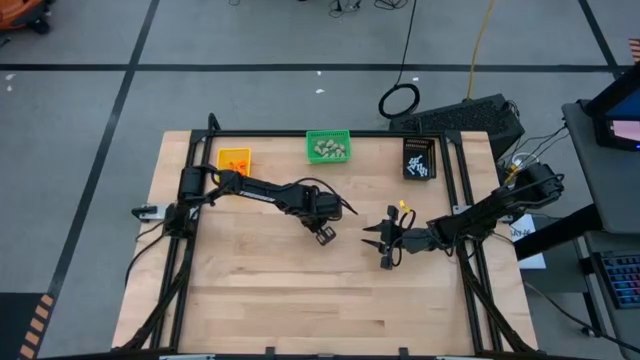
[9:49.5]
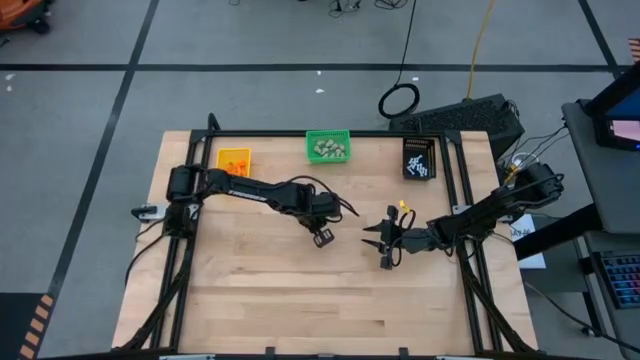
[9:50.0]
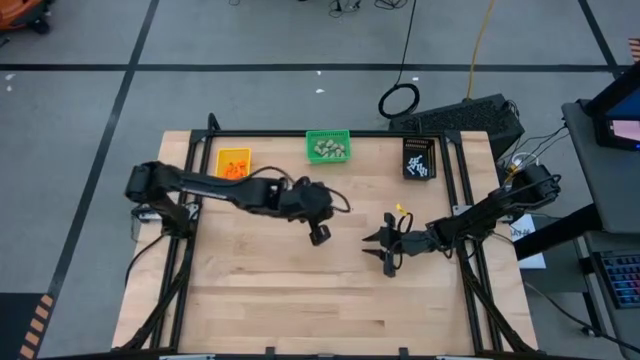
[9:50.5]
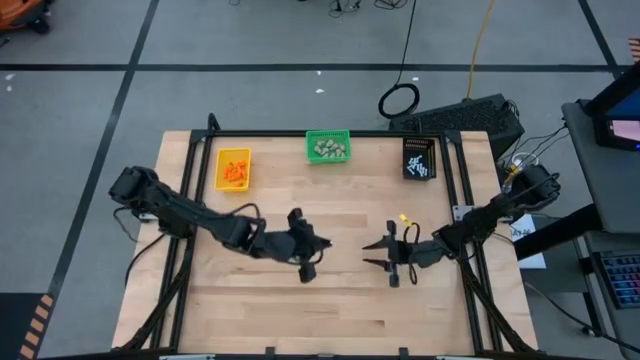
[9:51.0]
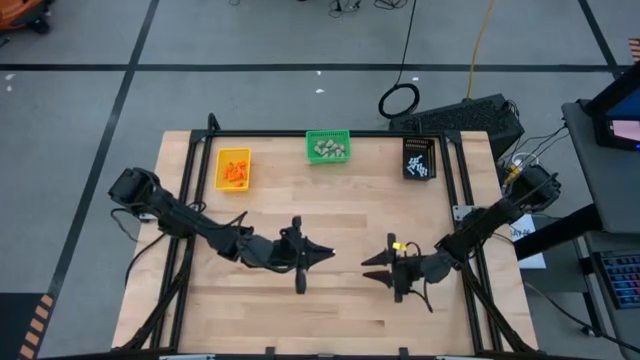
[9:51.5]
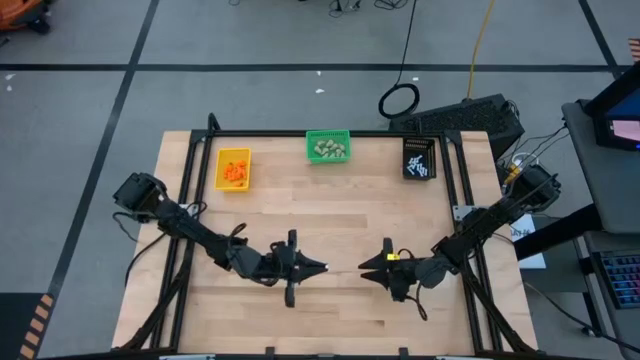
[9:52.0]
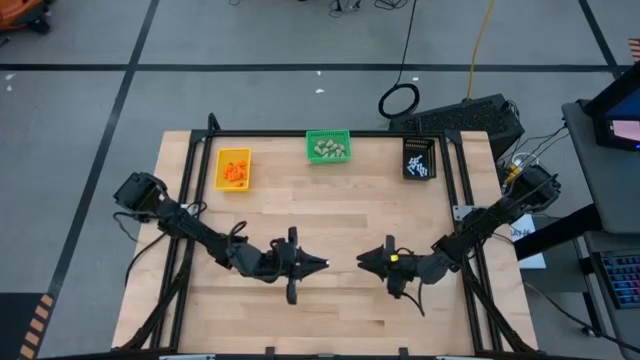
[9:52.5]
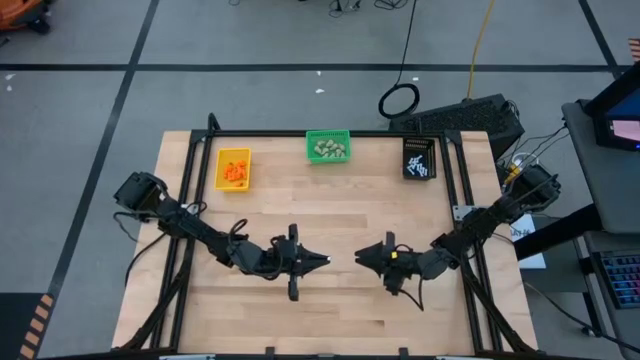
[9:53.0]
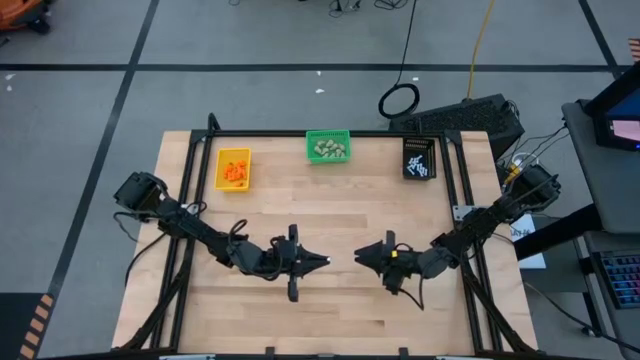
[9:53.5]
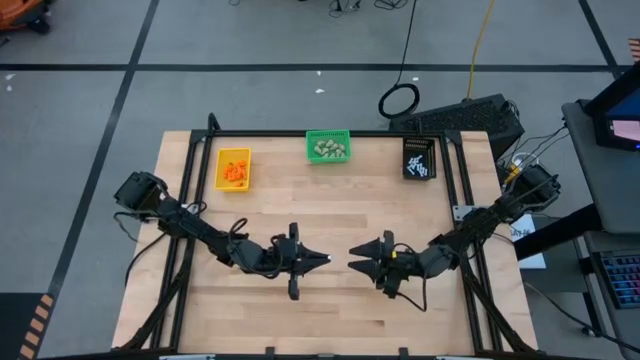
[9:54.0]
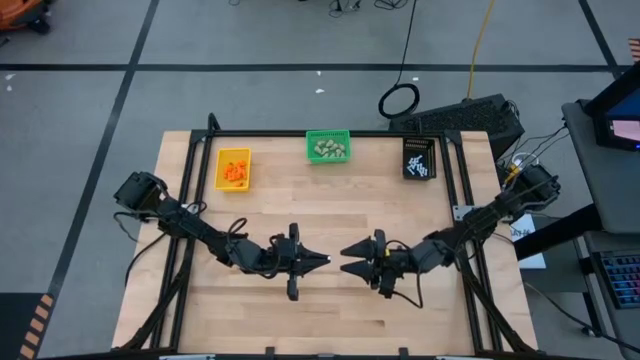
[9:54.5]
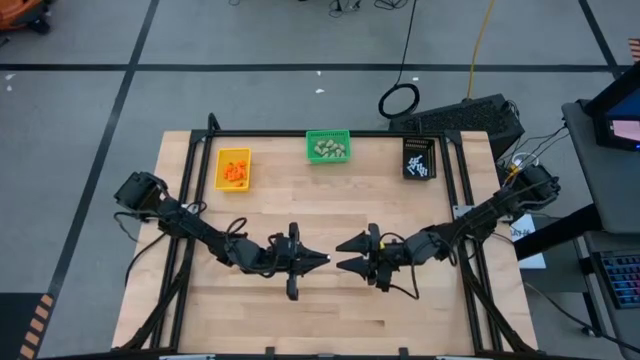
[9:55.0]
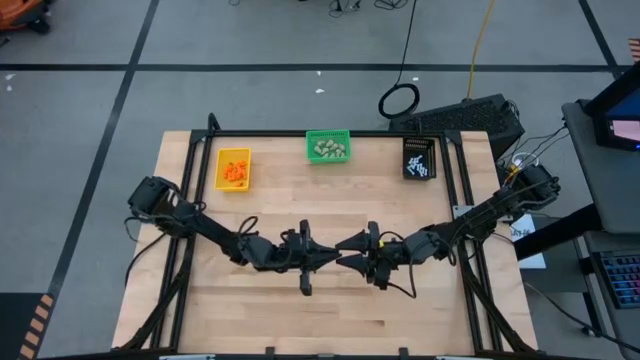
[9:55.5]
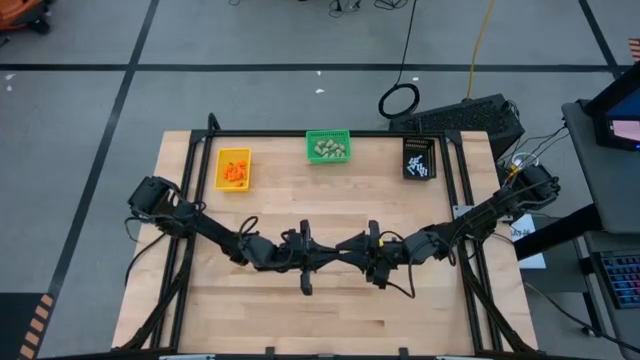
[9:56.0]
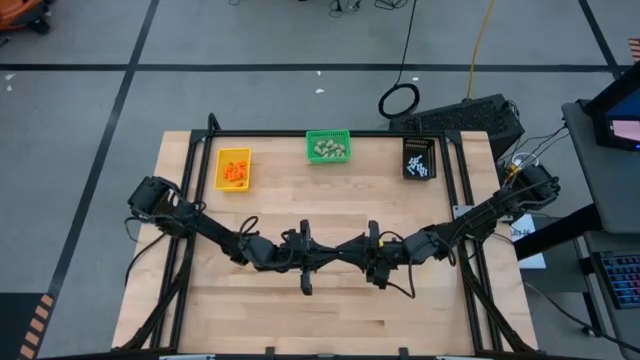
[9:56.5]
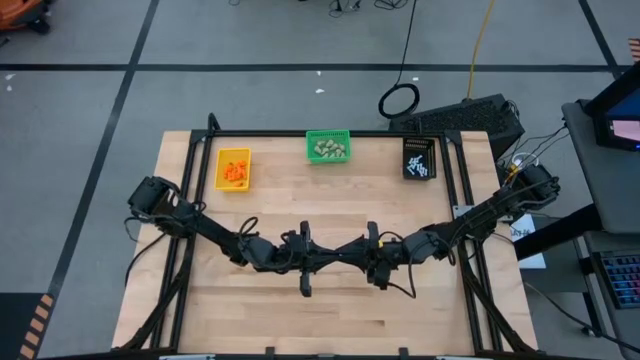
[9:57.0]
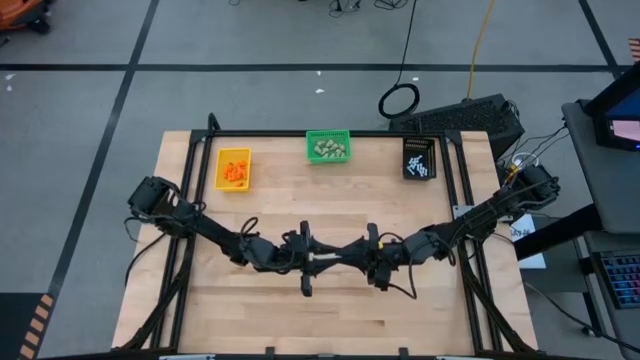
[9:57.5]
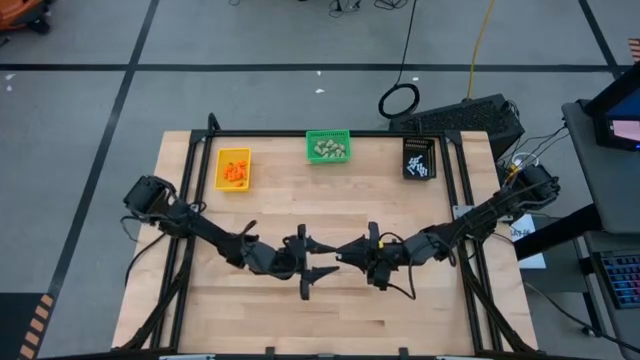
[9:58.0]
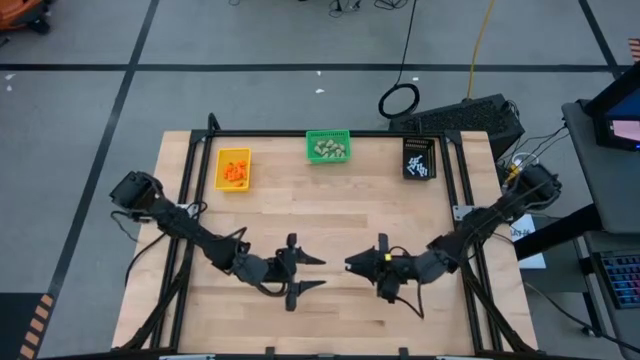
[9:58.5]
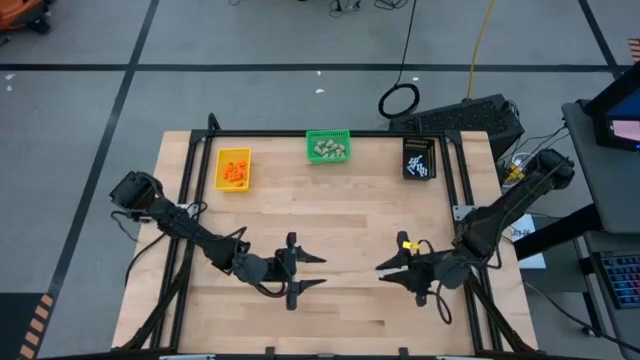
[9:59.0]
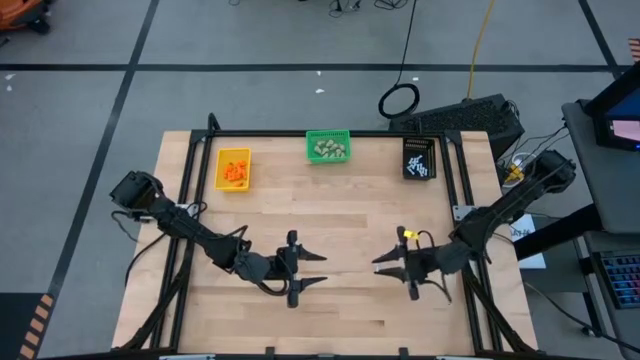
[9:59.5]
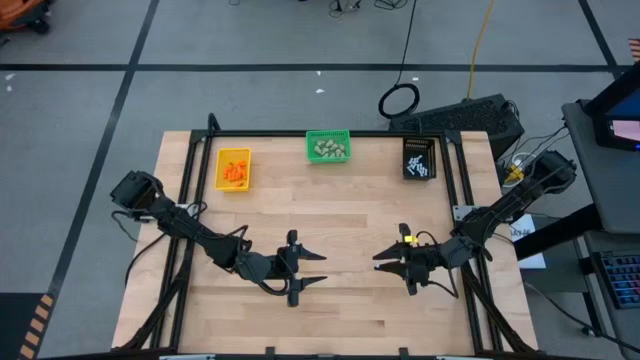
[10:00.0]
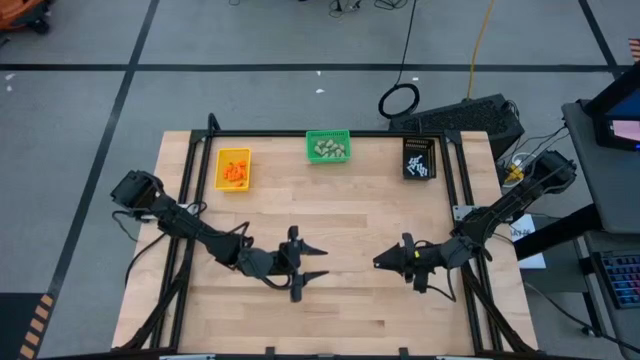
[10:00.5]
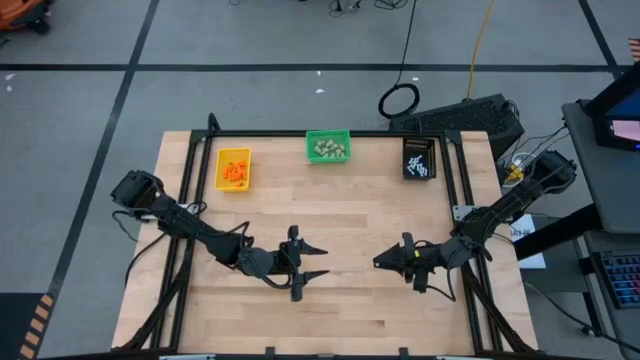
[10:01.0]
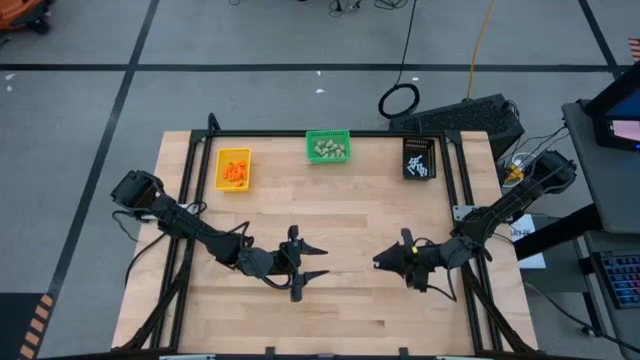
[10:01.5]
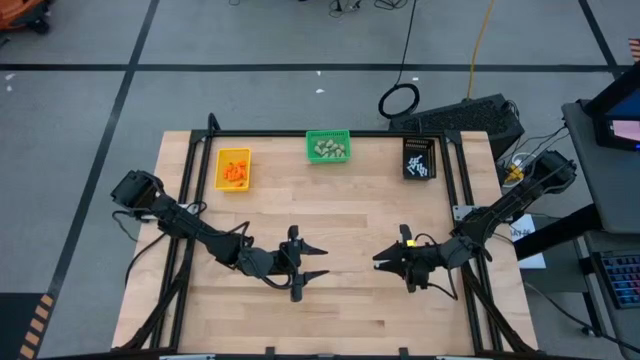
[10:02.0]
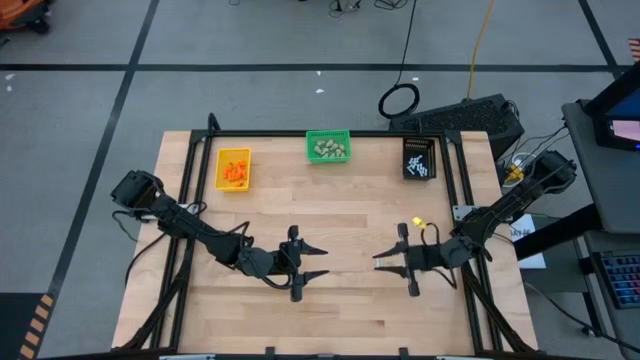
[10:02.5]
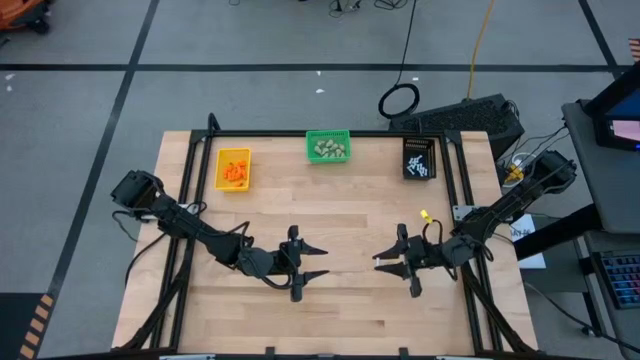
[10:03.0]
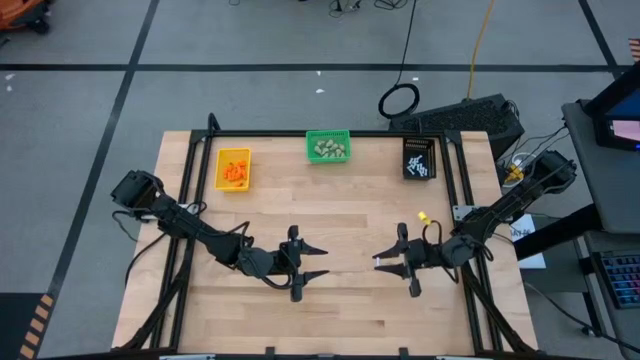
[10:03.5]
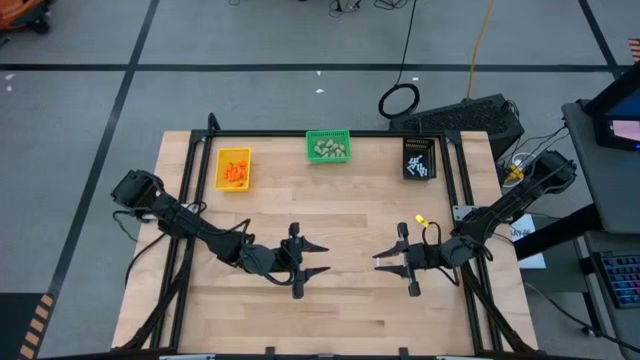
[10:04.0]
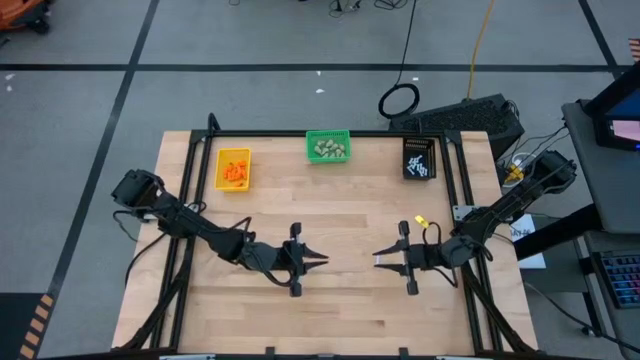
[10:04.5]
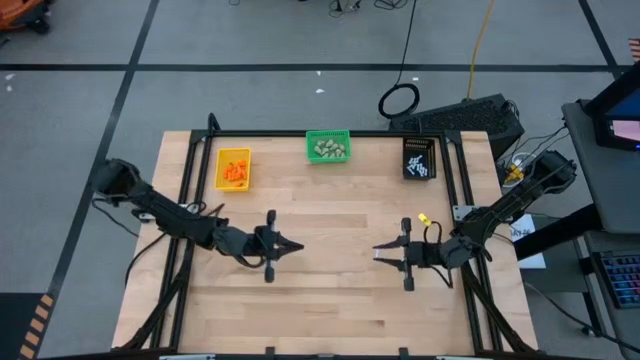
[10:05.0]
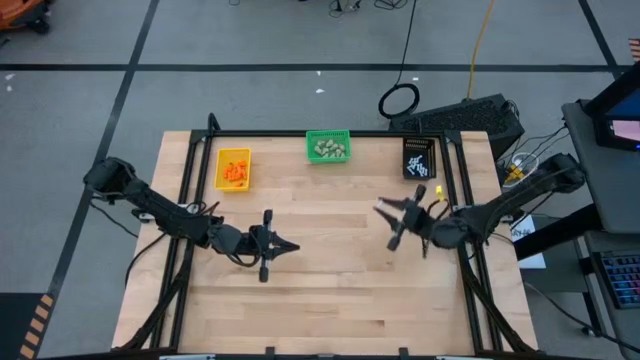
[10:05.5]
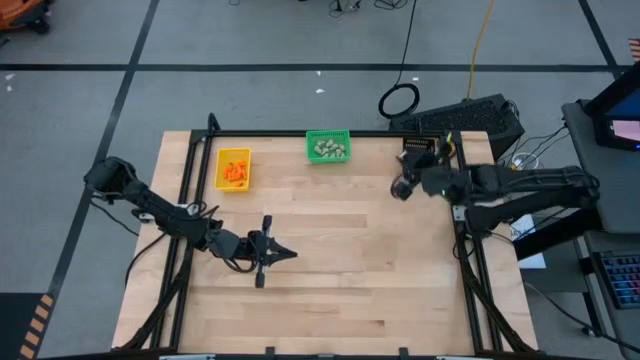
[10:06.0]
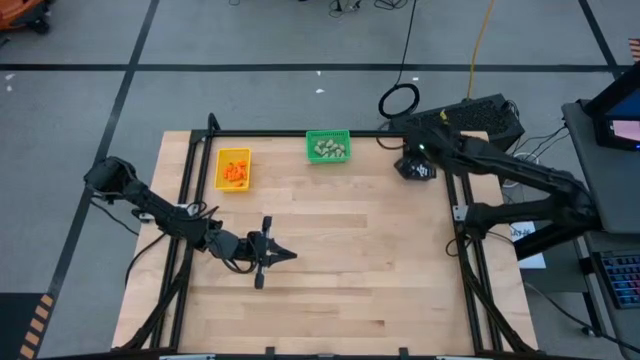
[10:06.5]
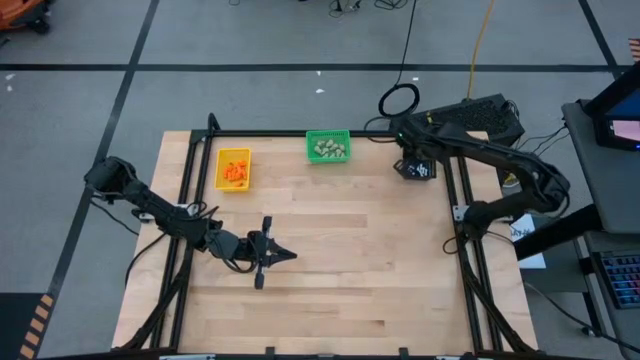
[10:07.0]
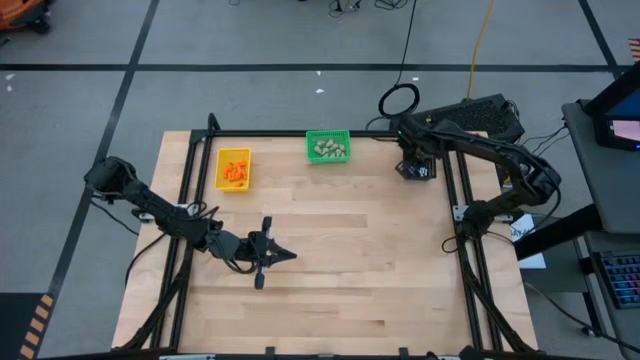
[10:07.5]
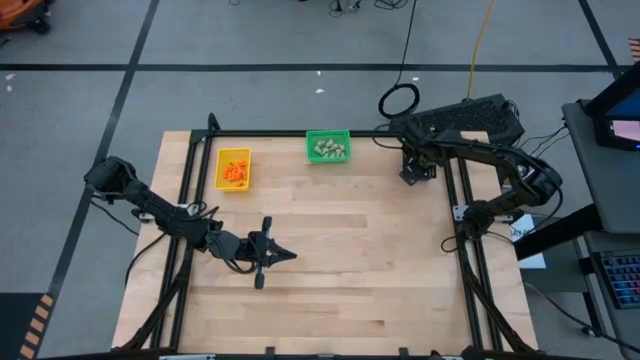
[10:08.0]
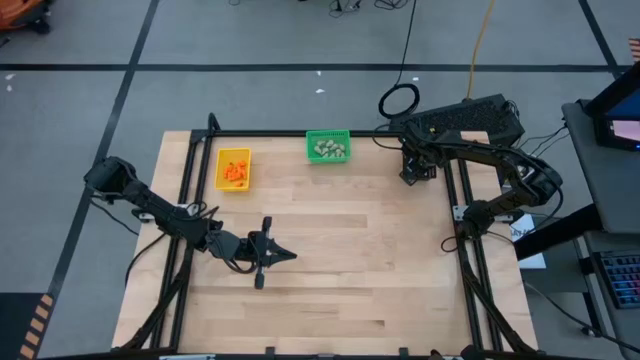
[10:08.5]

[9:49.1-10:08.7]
Task: Sort Halloween decoration
Put the white bone toy into the black bin

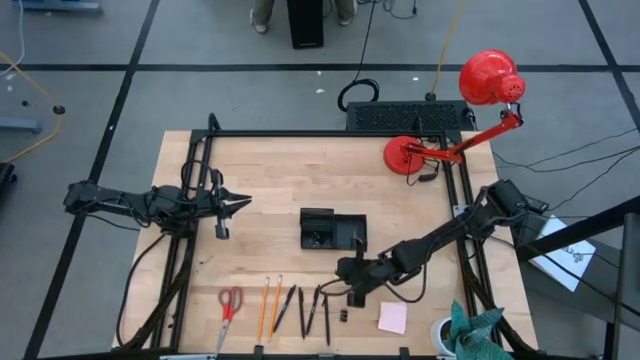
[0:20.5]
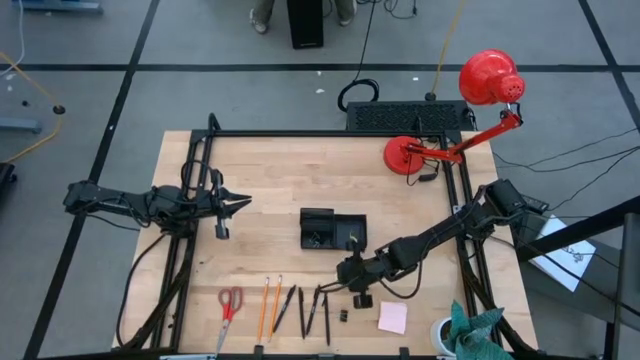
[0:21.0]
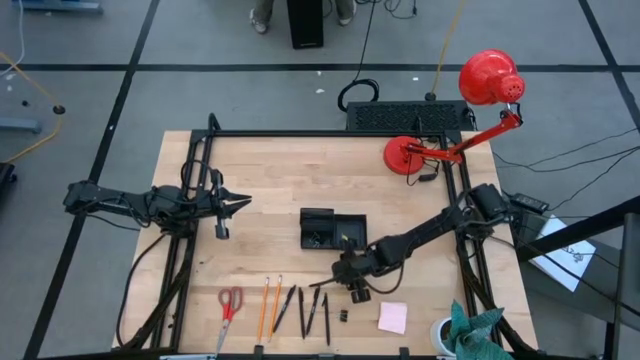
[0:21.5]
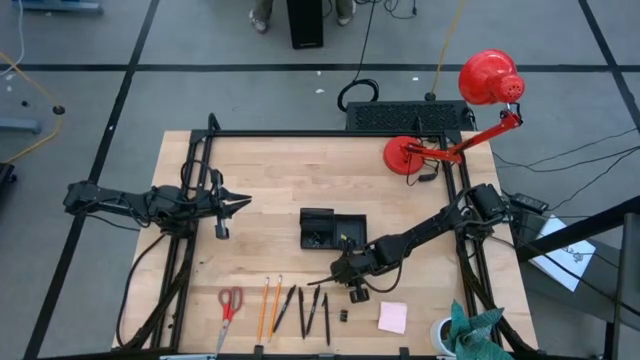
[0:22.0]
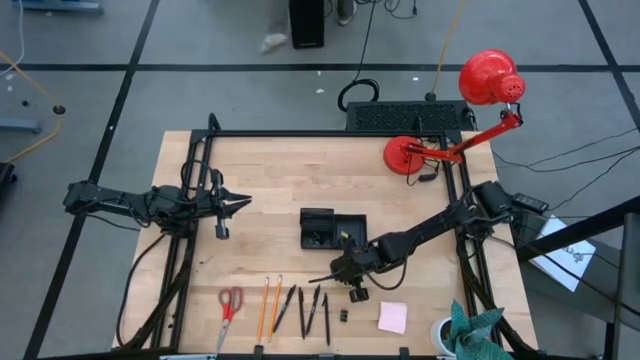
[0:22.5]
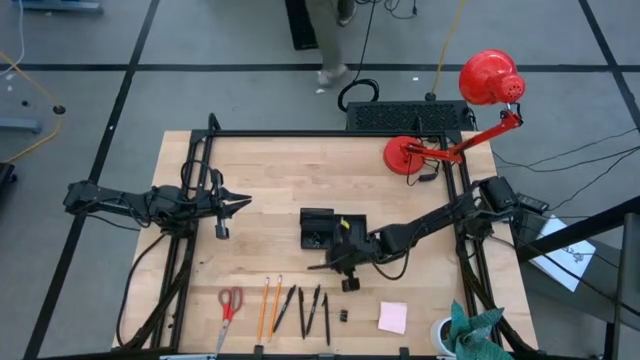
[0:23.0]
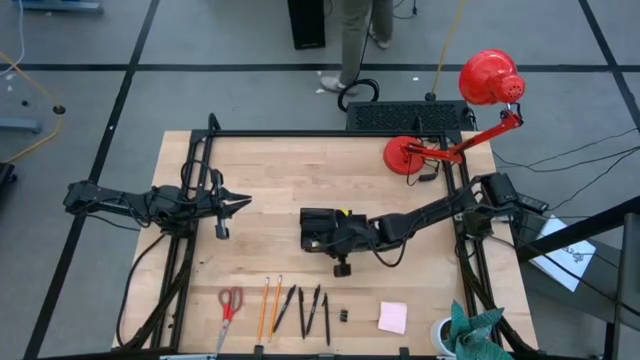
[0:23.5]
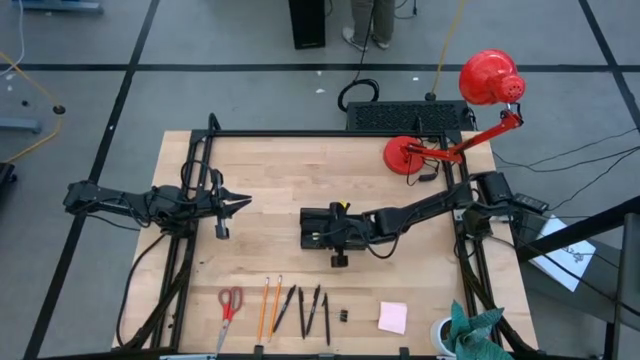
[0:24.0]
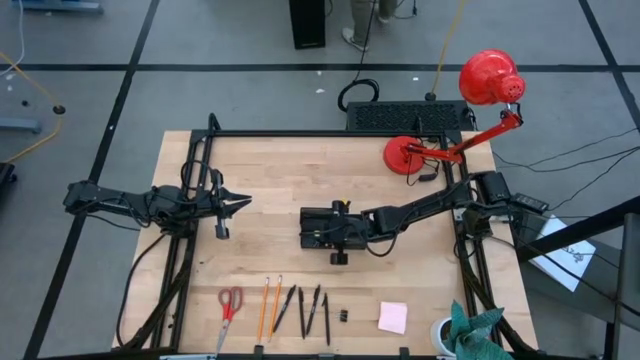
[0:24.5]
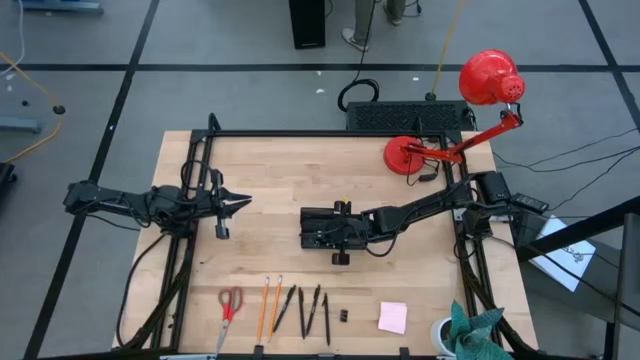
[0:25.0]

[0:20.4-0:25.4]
Task: Pick and place office supplies into organizer
Put the green eraser into the desk organizer
